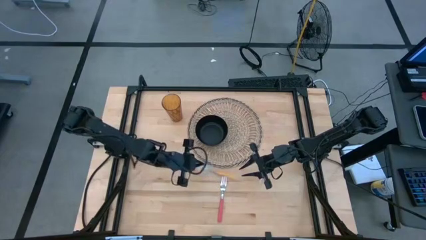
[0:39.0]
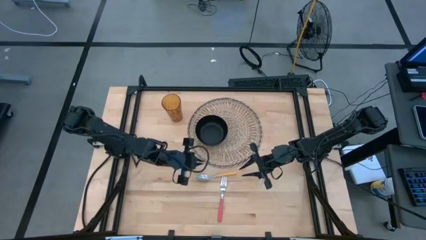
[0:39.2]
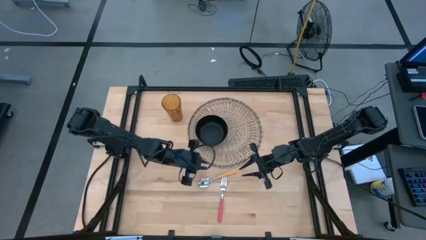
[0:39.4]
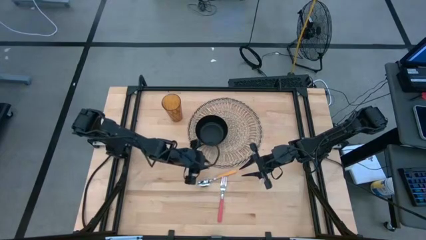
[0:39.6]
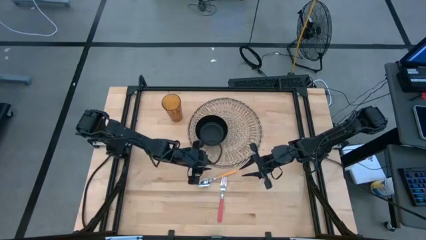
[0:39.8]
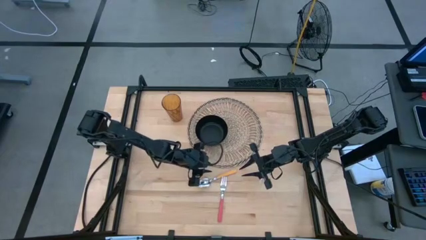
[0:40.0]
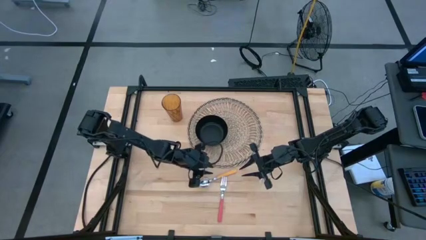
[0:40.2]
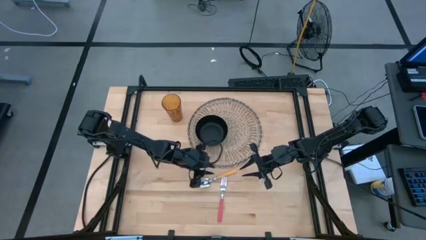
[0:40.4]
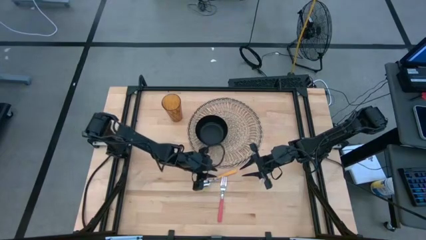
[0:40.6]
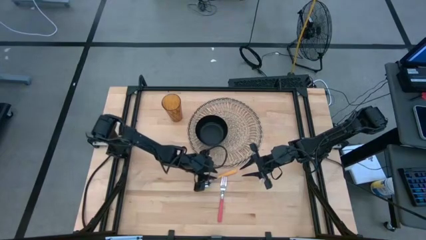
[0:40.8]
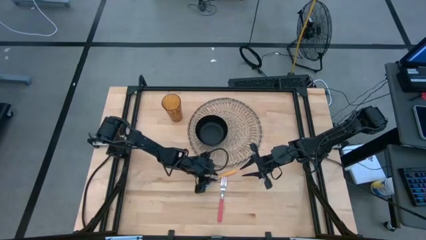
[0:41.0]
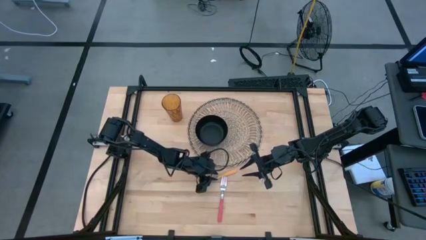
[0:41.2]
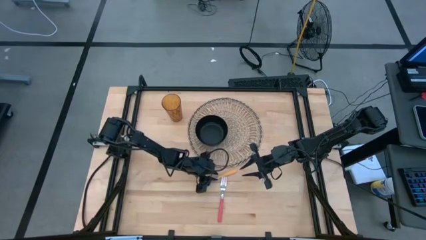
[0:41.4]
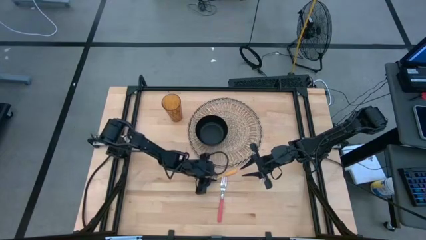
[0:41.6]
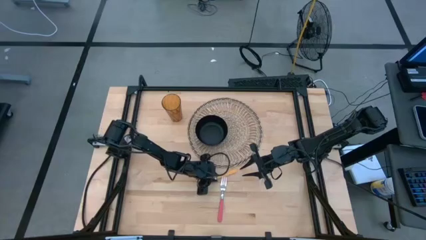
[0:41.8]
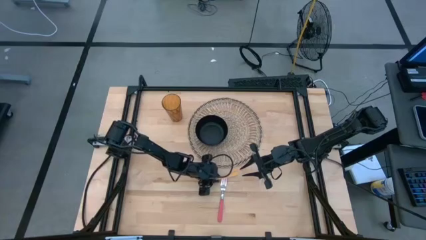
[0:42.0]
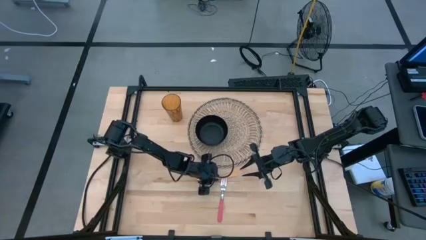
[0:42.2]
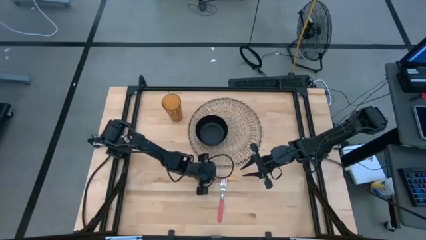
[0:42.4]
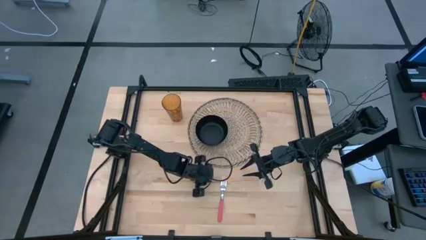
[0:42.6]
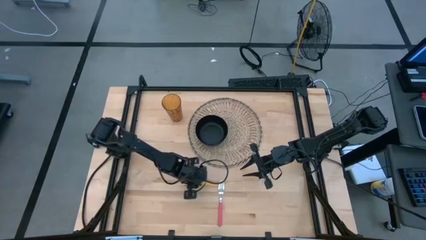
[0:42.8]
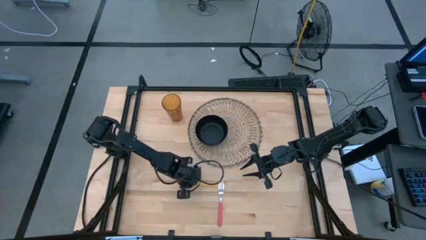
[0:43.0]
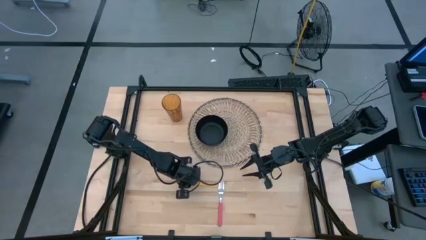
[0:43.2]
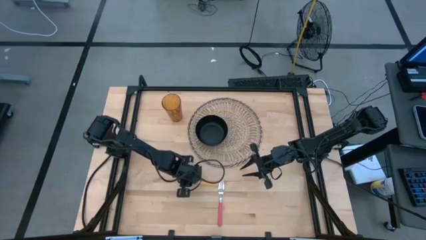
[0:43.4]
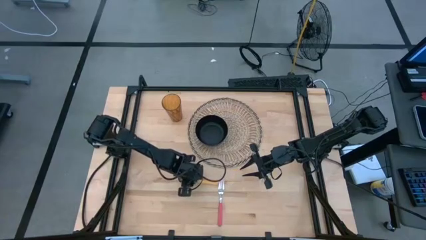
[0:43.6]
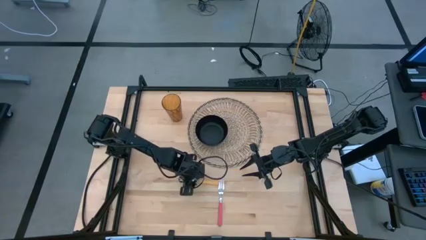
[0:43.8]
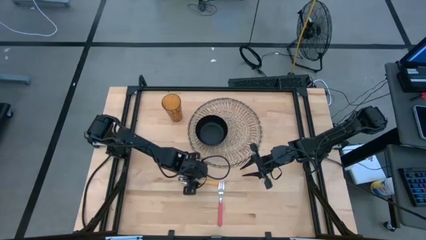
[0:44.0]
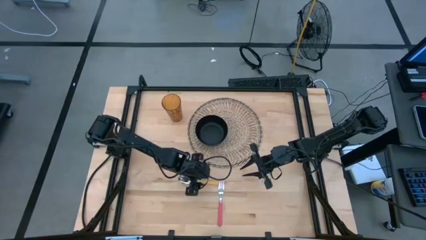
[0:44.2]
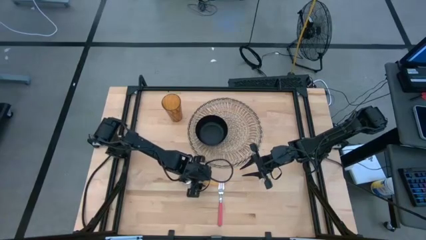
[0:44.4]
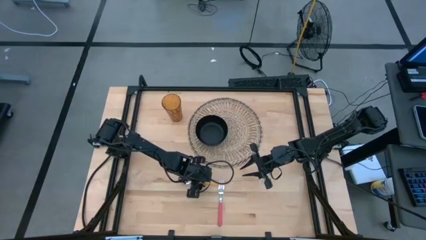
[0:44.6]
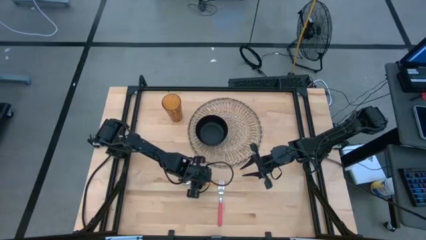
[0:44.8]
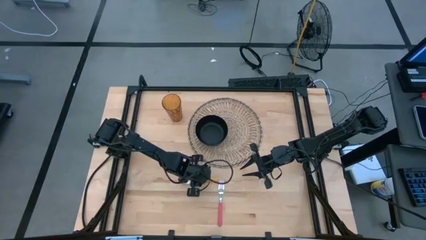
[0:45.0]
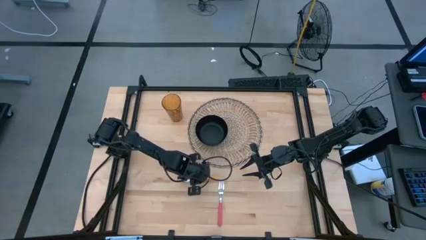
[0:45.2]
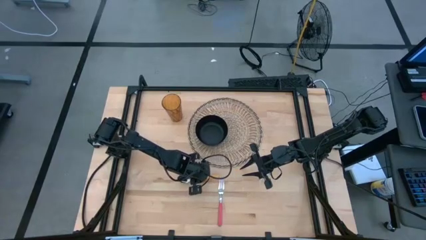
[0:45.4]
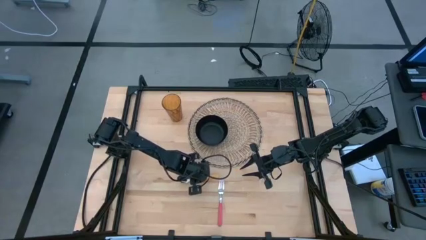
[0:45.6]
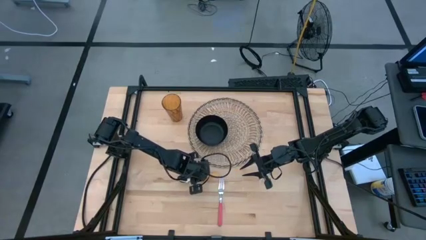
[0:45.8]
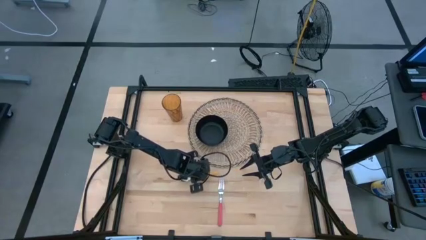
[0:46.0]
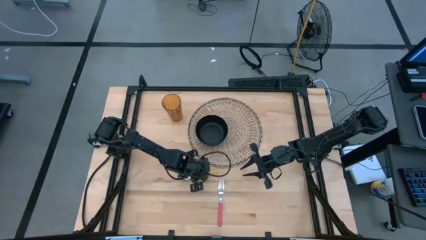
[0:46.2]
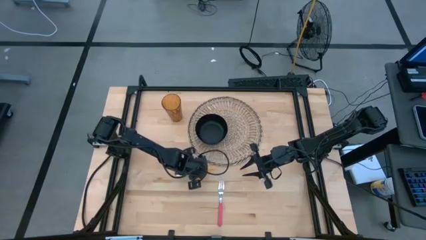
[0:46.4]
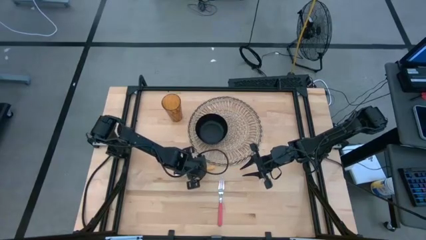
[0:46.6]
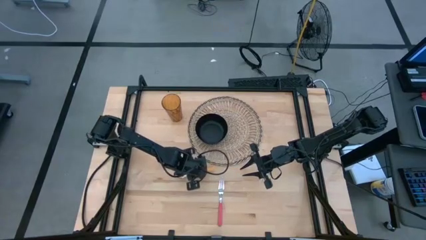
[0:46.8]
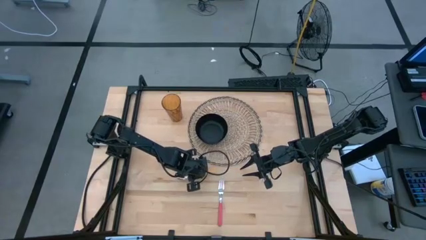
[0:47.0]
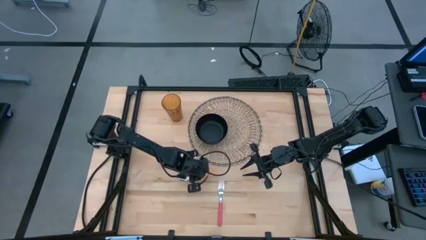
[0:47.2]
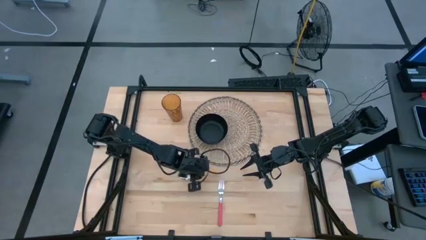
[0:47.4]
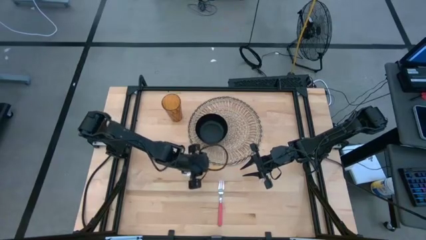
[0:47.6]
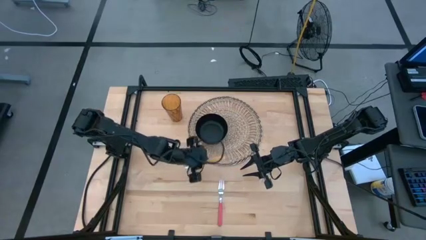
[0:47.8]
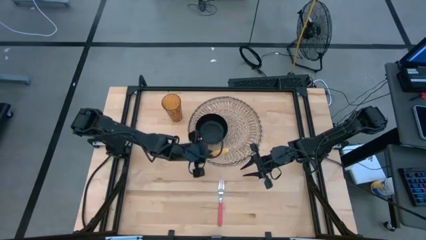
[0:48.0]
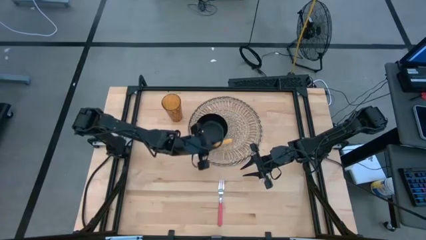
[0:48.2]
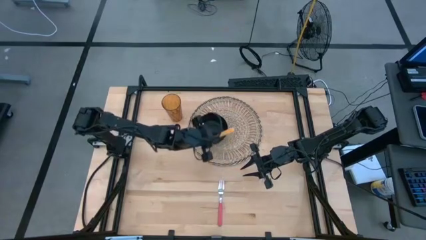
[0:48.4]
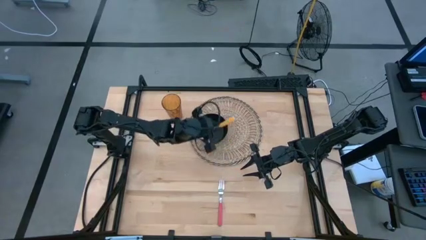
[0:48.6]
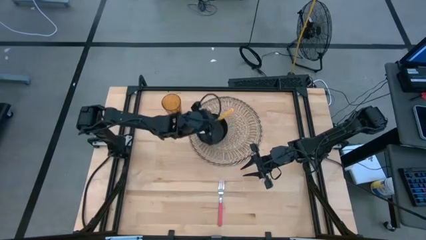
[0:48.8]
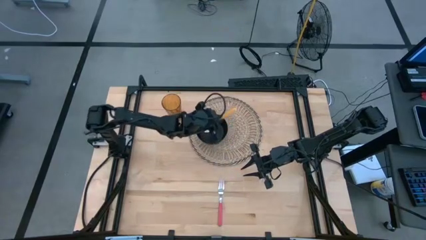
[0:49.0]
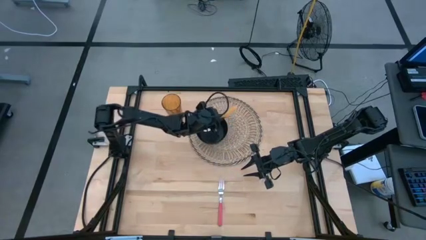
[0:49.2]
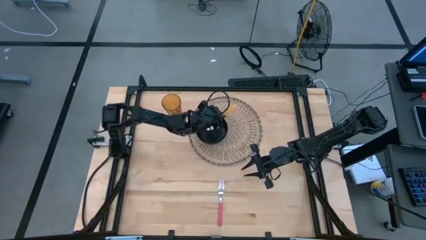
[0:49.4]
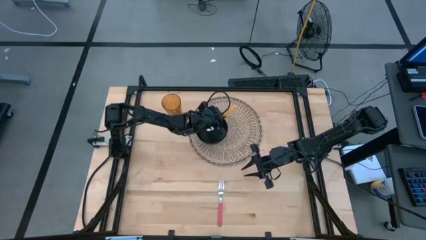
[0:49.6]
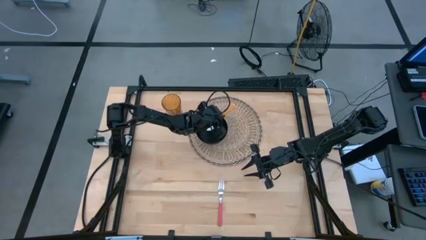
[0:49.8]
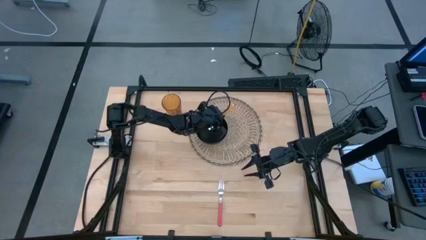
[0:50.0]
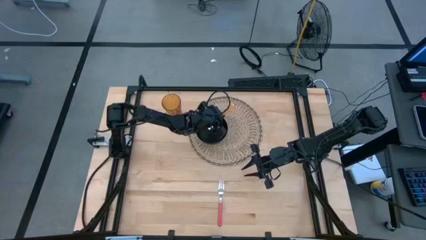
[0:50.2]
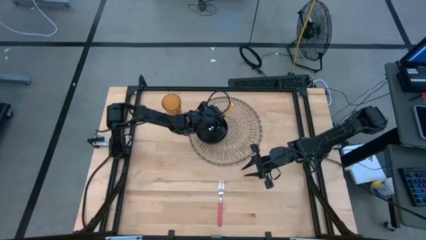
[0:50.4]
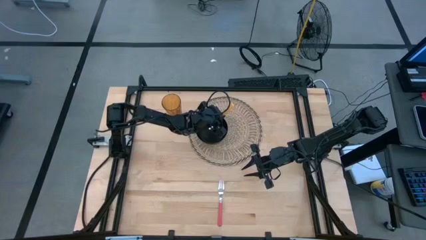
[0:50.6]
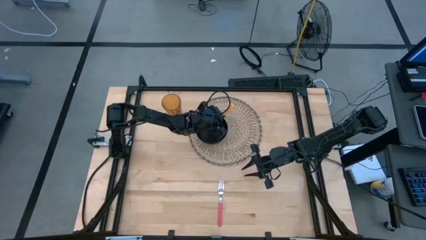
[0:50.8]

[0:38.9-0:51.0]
Task: Pick & Place Utensil
Put the yellow spoon into the black bowl on the brown mat

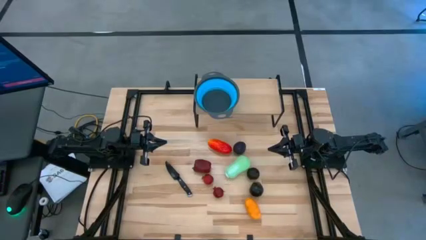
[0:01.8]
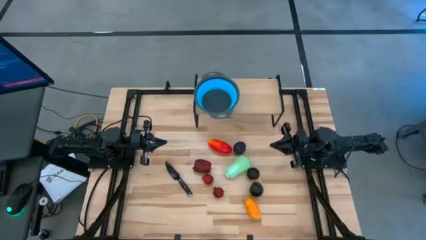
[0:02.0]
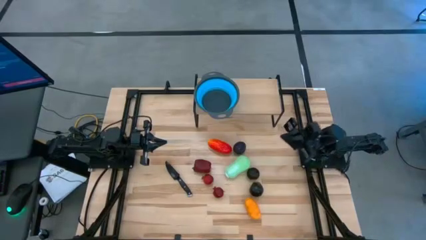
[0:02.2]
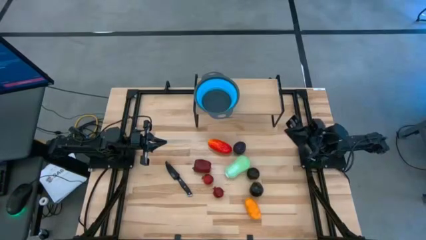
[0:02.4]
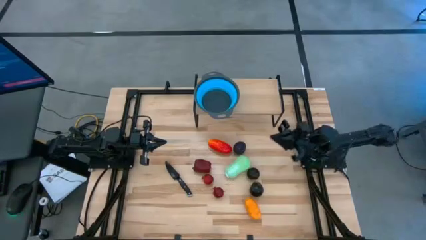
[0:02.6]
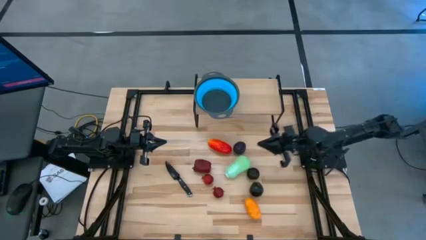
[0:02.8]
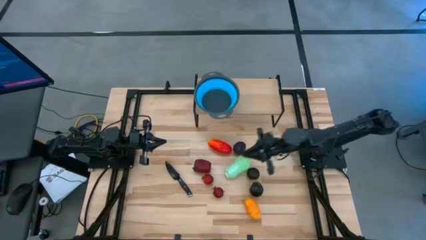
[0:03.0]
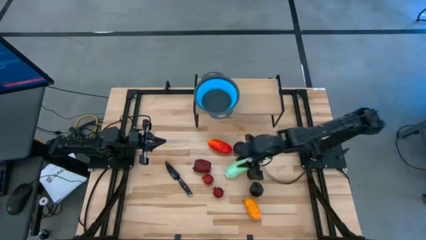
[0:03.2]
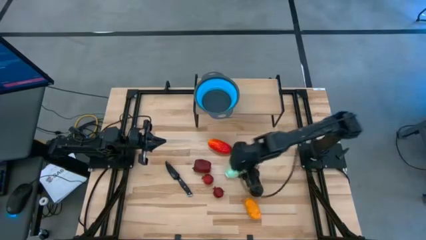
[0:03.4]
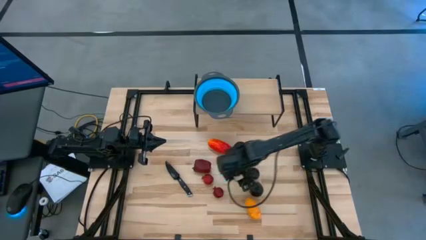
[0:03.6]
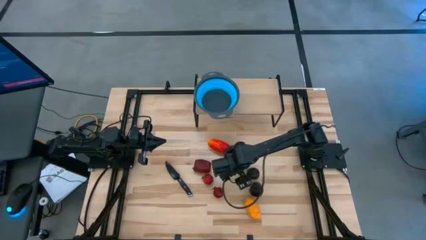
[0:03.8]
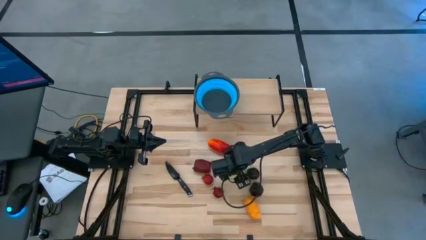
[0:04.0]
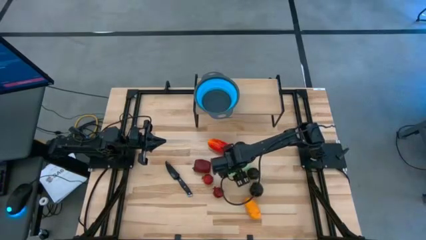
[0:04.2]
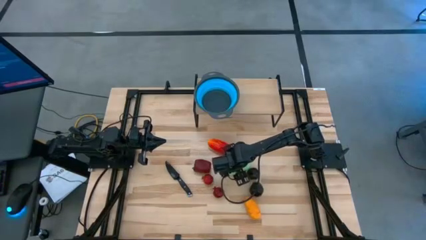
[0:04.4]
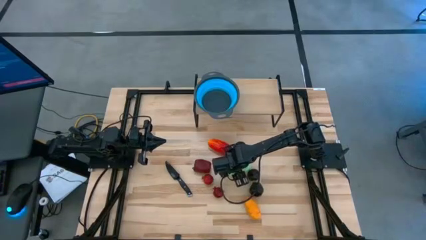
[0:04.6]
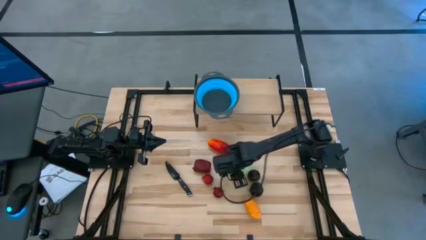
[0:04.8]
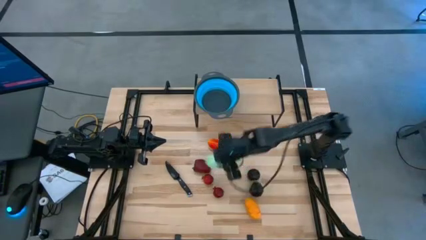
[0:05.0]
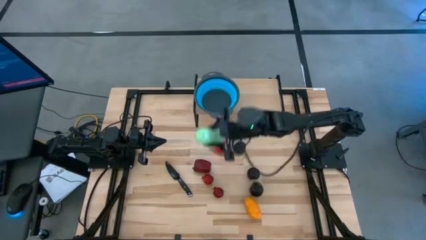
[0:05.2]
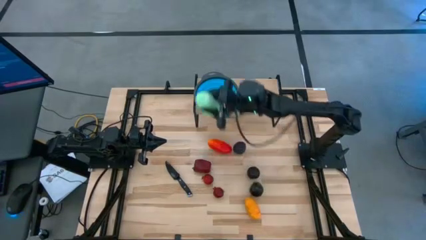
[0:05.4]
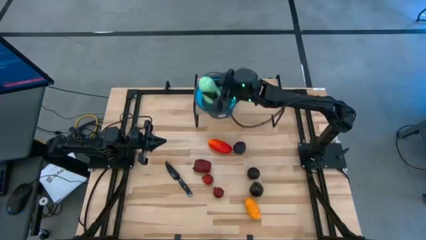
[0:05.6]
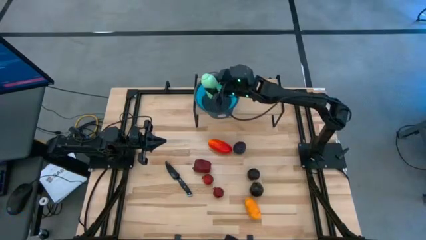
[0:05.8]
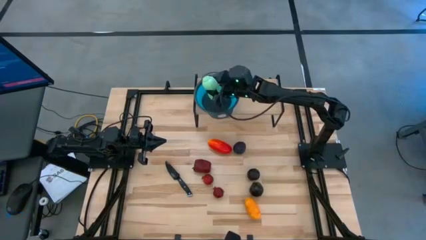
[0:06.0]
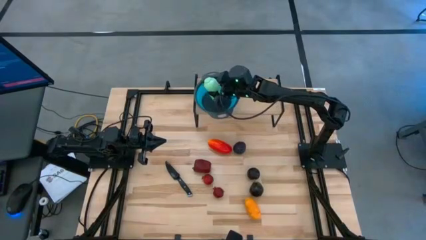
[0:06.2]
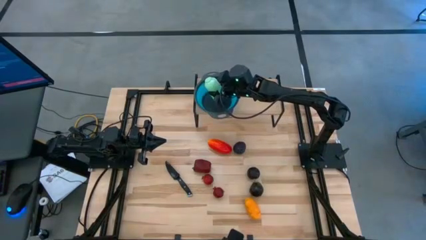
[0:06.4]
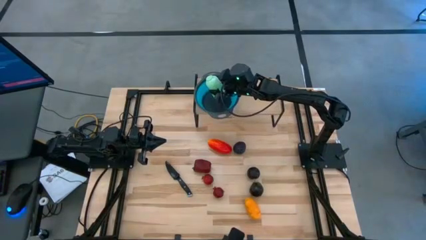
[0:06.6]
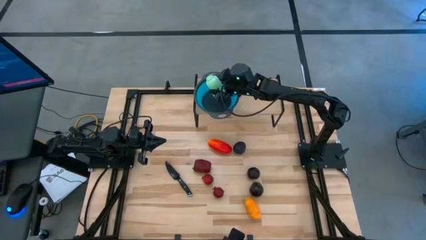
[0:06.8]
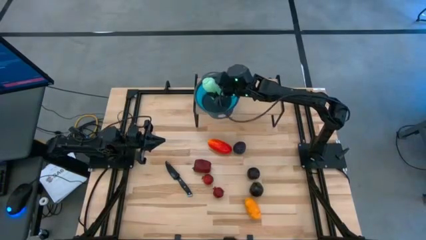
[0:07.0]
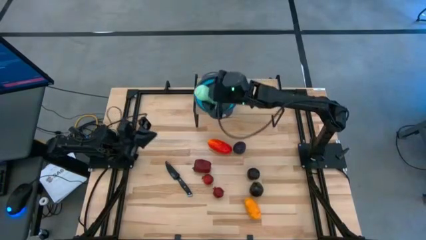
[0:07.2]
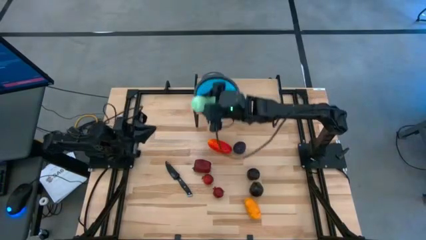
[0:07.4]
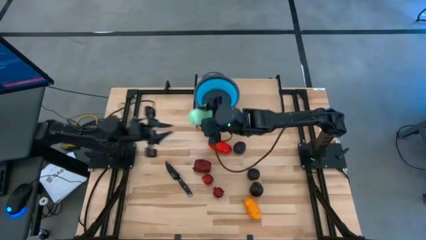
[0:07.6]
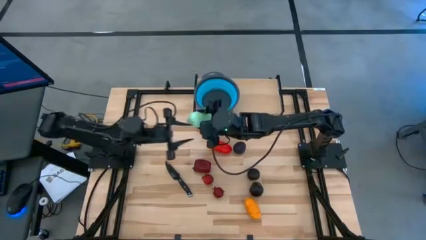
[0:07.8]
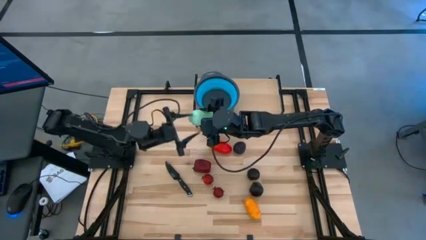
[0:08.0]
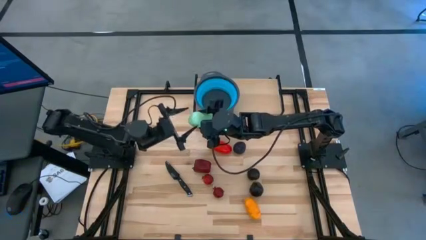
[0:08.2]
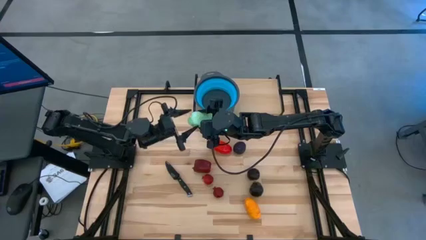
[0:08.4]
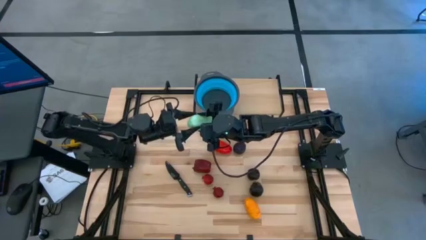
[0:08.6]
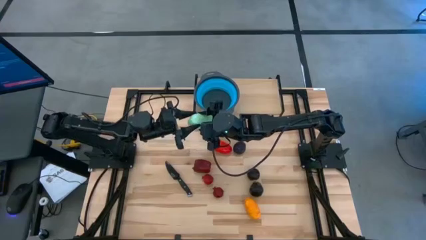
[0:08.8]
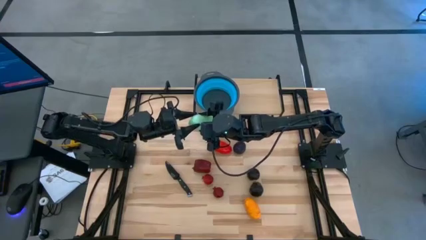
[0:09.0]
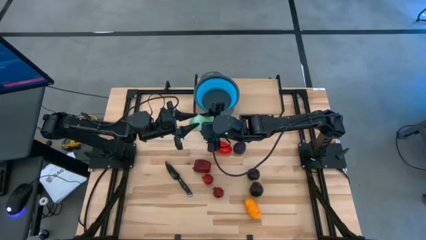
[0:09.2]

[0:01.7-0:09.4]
Task: Pick & Place Fruit
Put the green cabbage into the blue strainer bowl on the shelf
